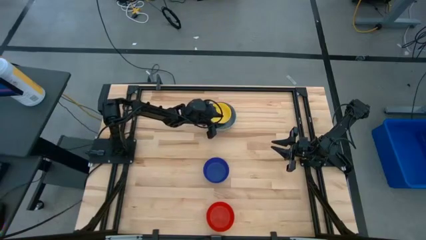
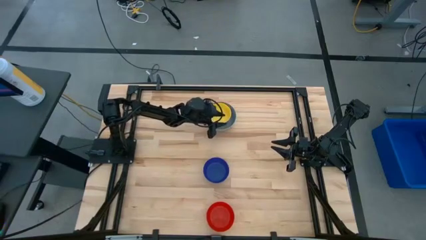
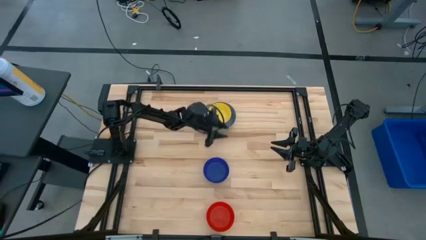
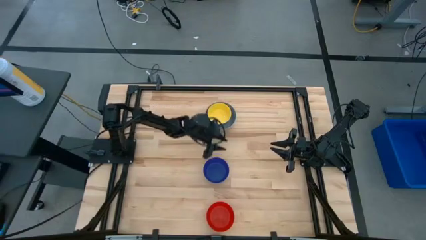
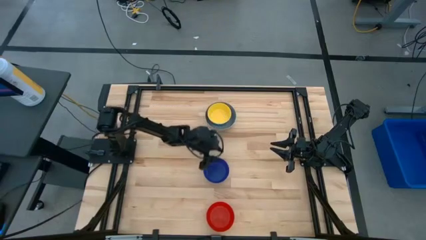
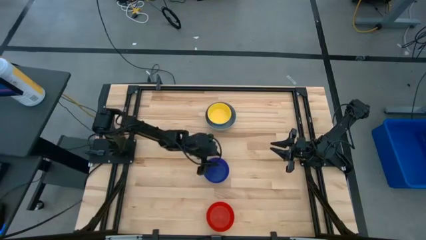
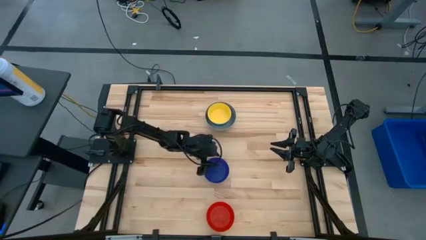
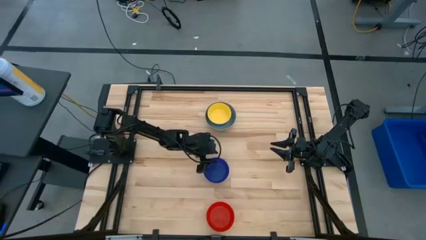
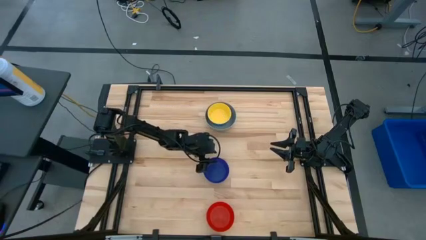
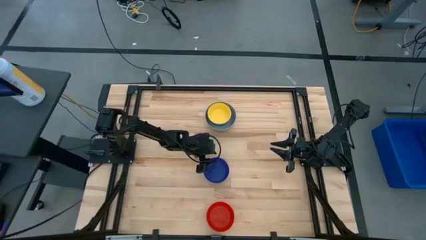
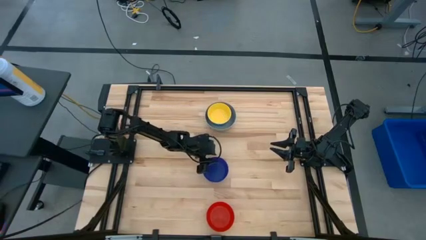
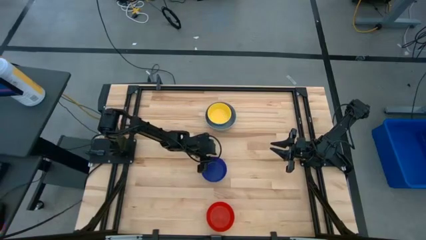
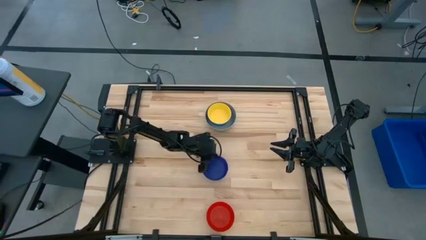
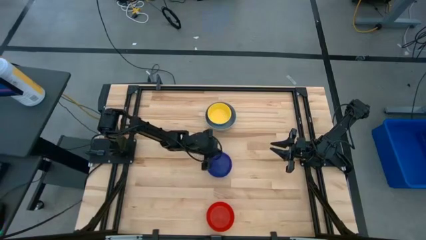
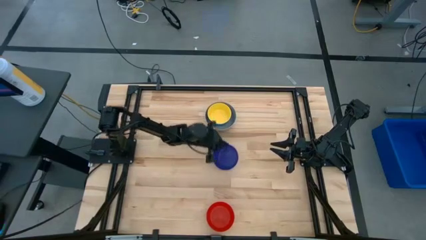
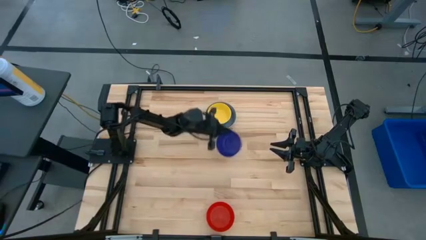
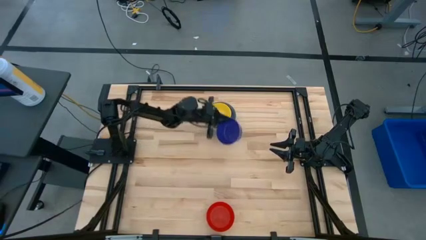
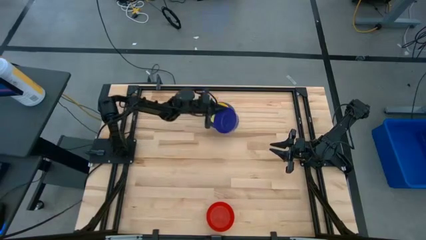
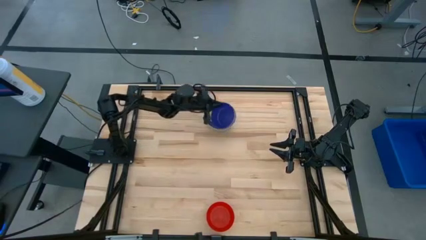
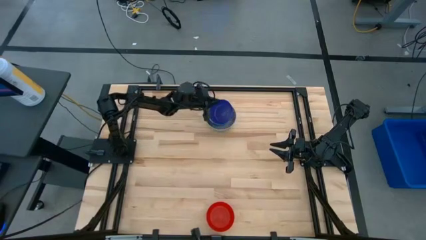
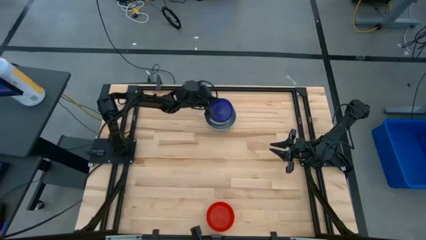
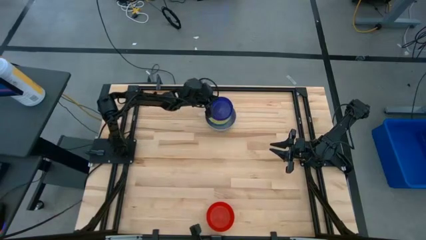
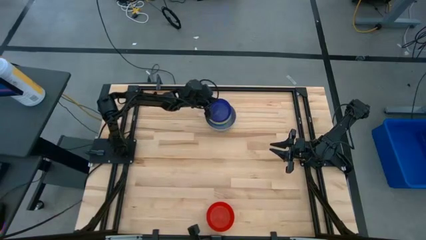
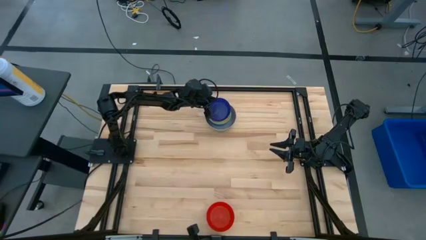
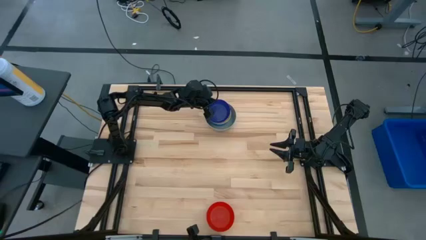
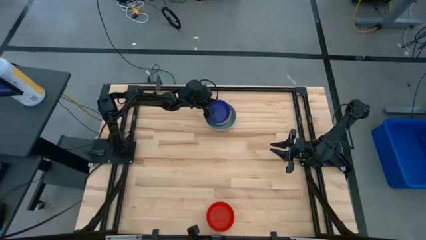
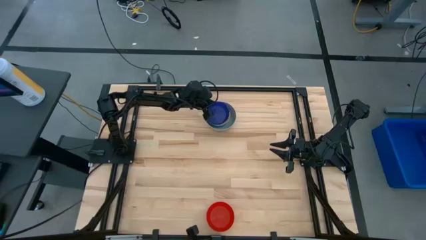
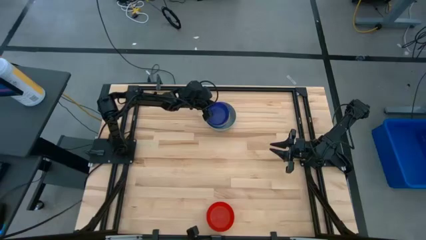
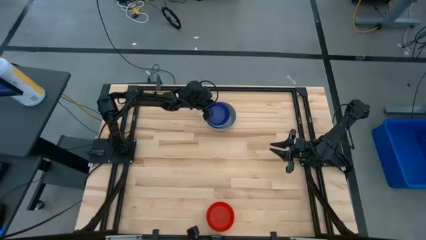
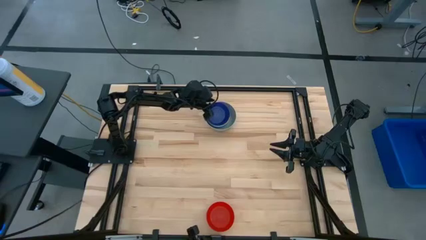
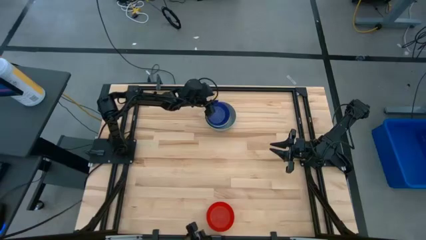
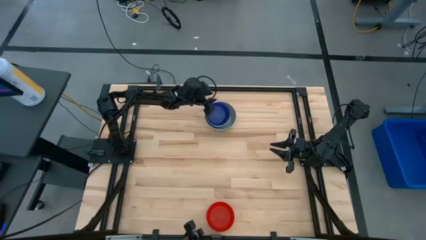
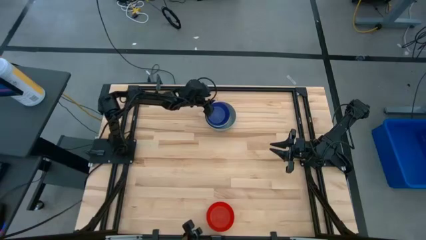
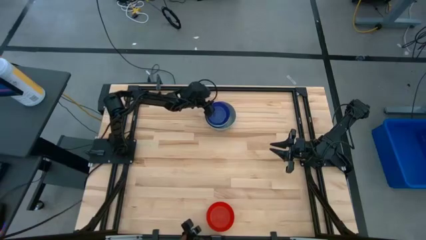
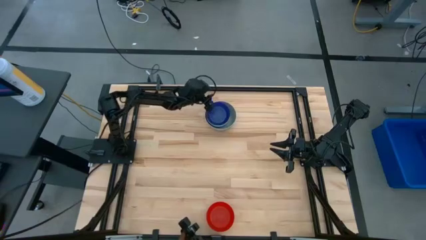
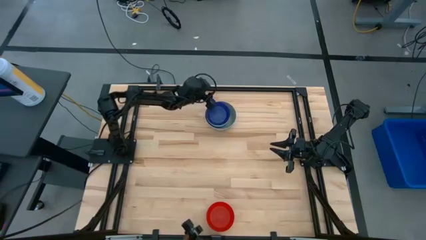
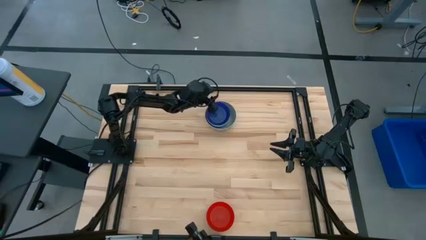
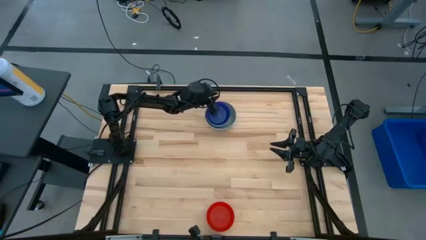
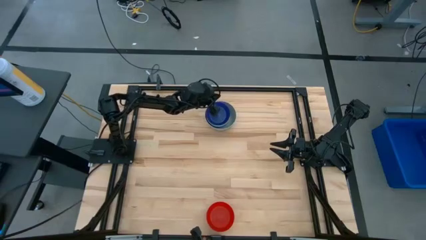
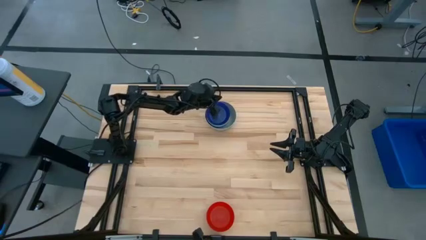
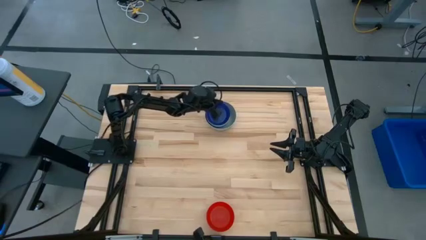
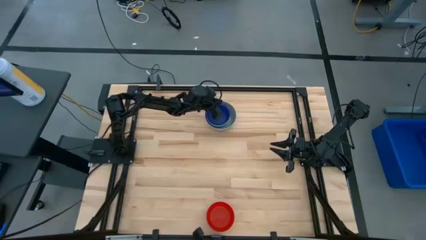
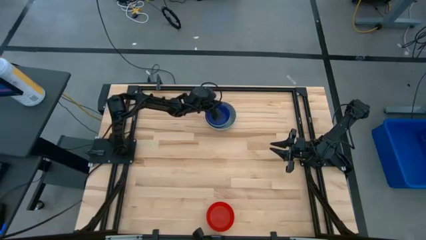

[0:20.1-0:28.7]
Stack the dark blue bowl on the yellow bowl

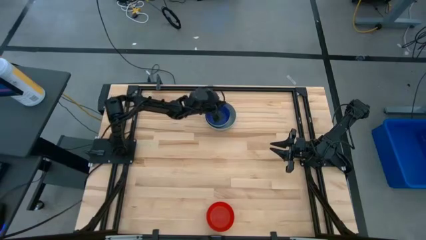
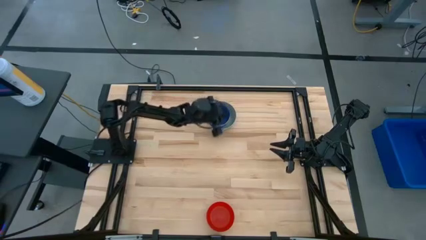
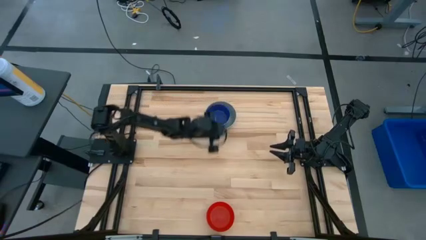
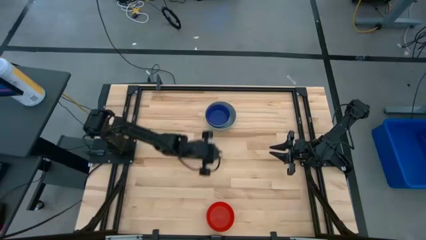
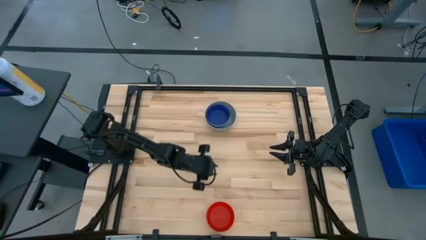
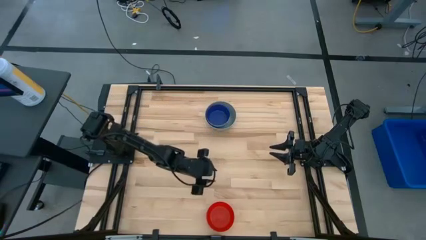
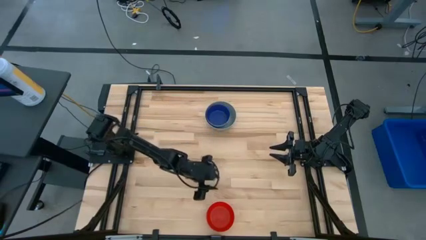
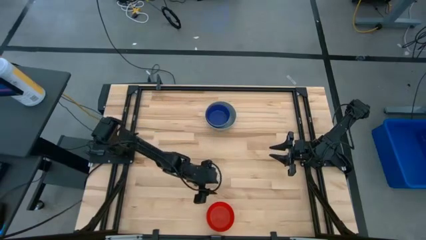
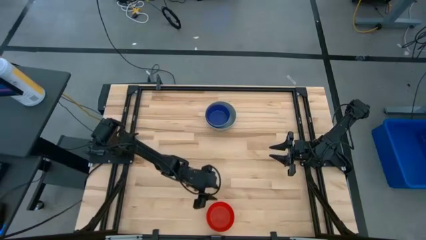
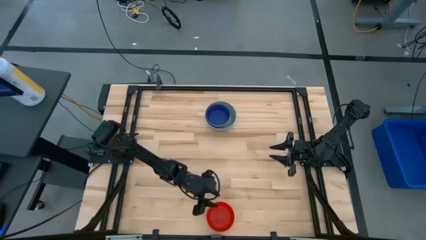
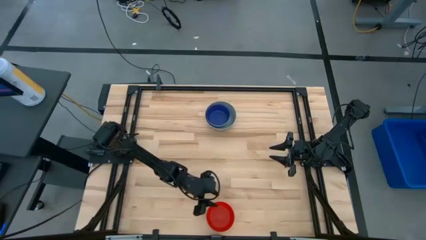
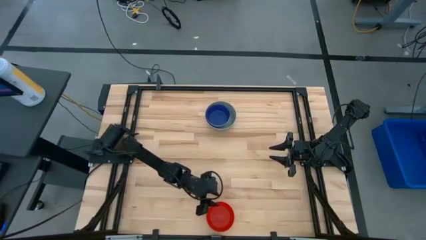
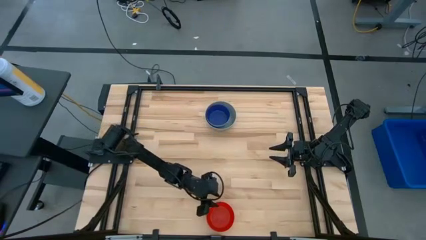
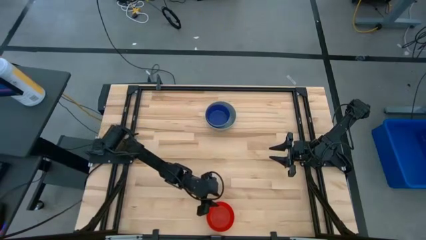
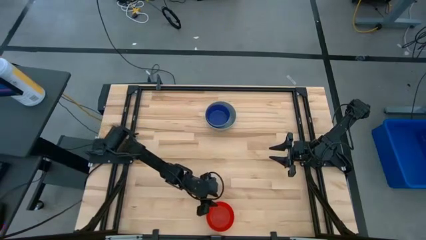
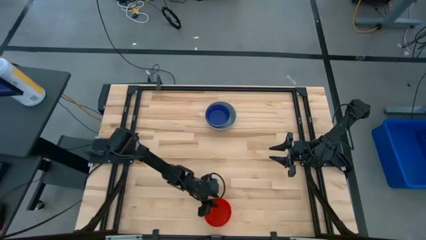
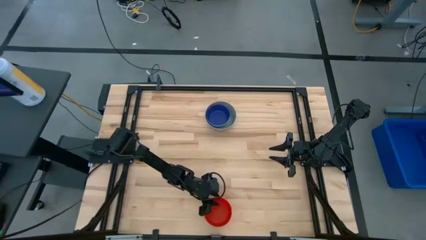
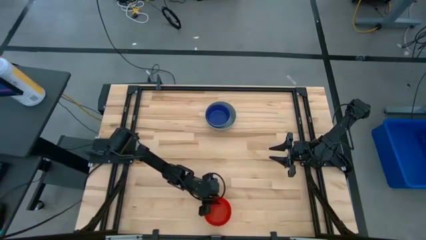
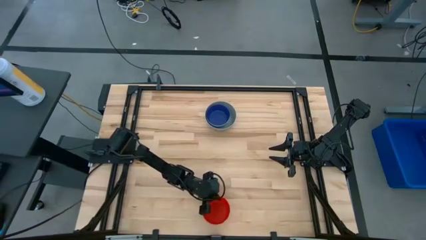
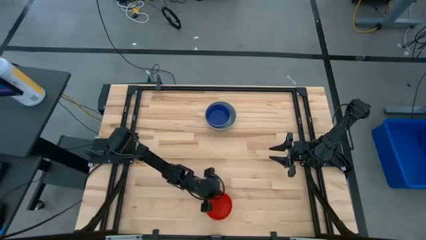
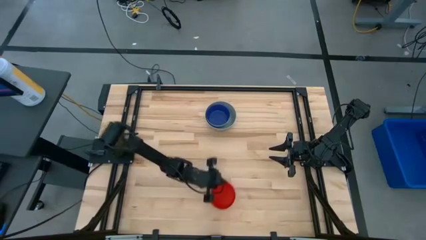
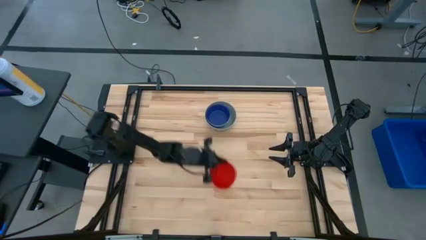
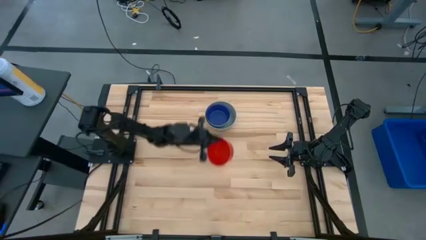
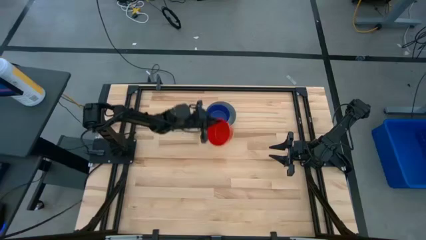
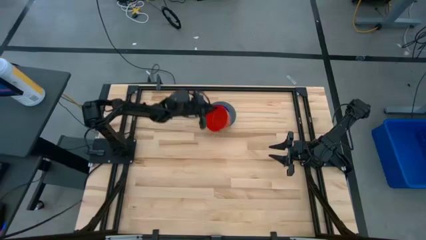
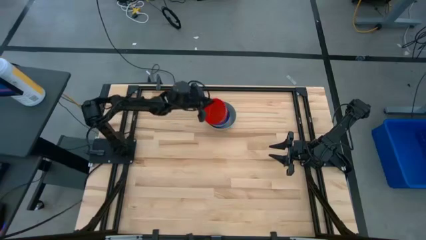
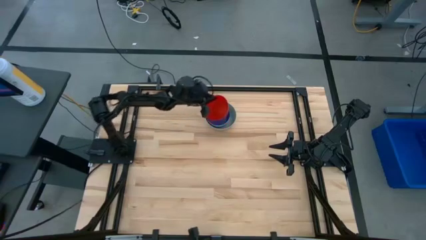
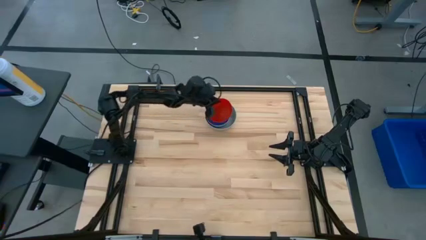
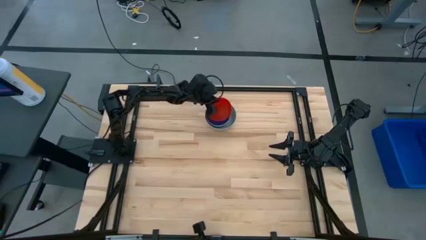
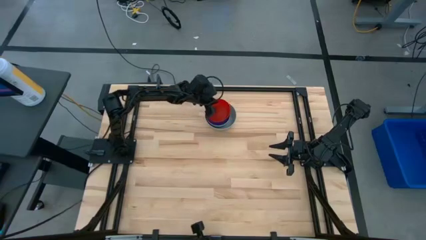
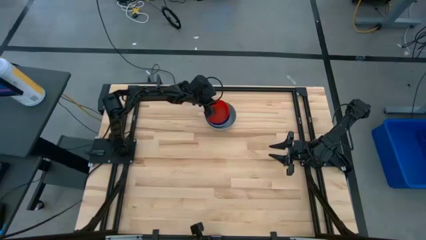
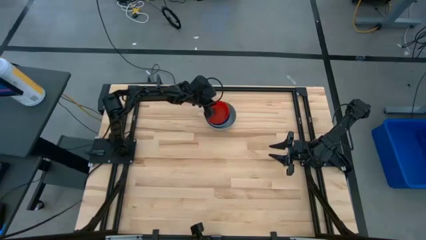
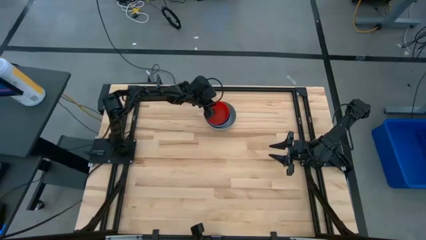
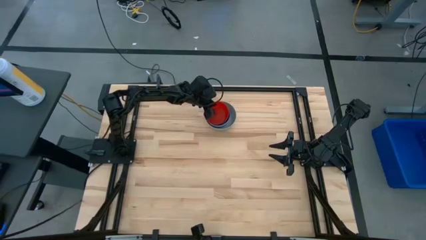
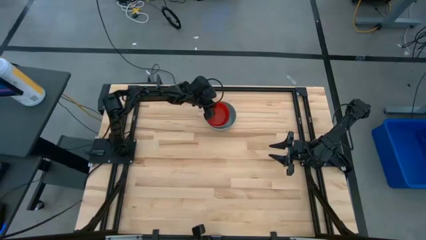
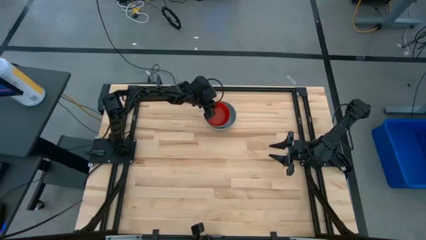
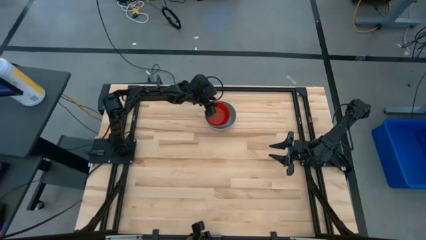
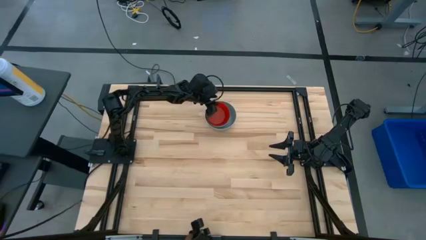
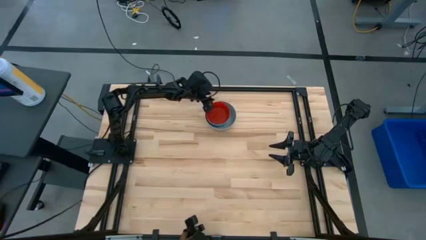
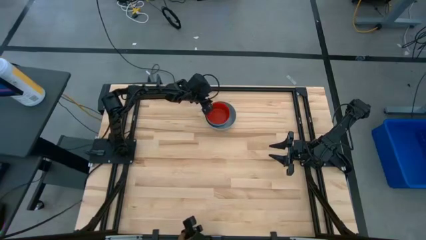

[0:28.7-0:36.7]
Stack the red bowl on the dark blue bowl
